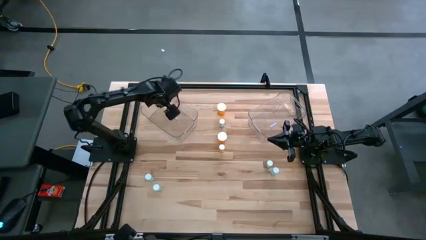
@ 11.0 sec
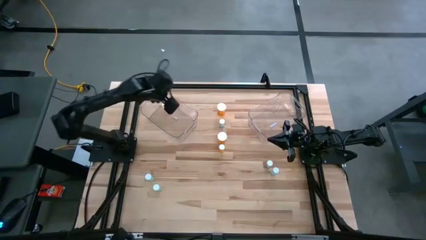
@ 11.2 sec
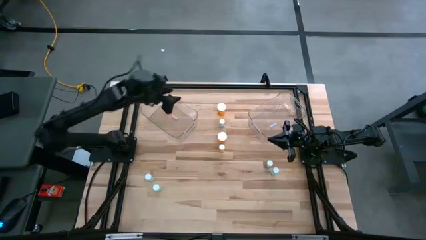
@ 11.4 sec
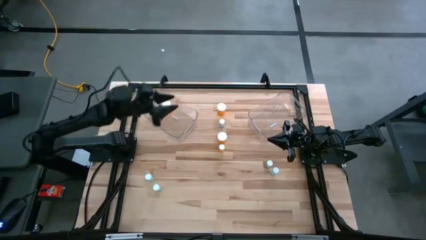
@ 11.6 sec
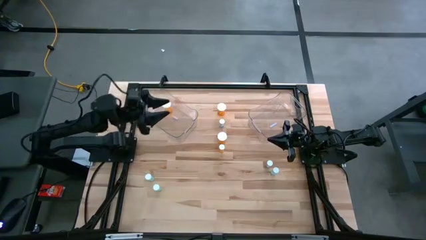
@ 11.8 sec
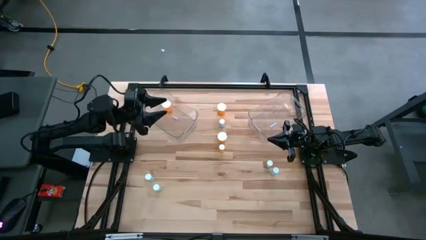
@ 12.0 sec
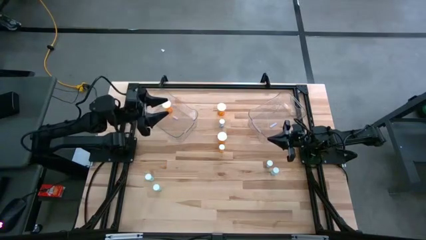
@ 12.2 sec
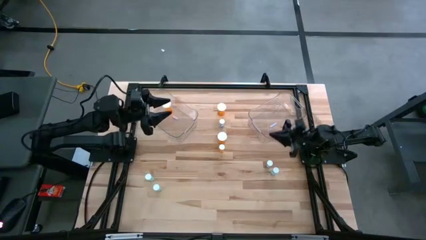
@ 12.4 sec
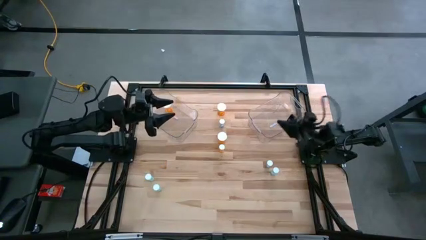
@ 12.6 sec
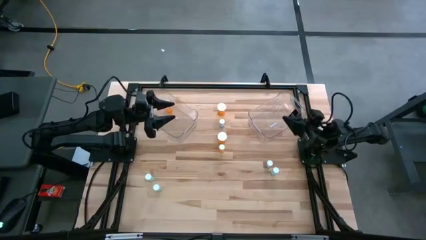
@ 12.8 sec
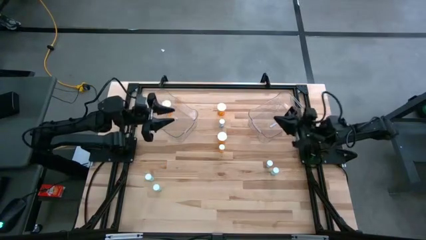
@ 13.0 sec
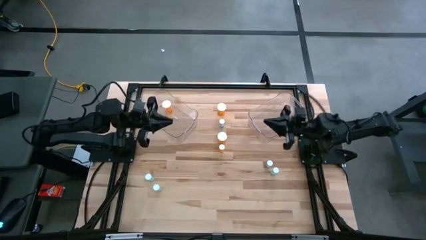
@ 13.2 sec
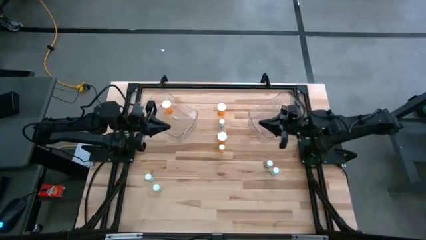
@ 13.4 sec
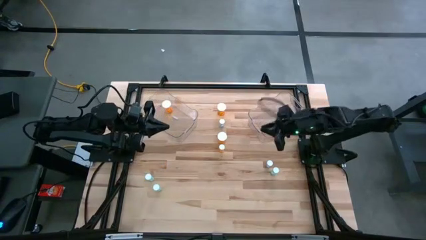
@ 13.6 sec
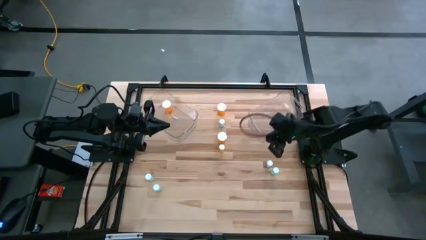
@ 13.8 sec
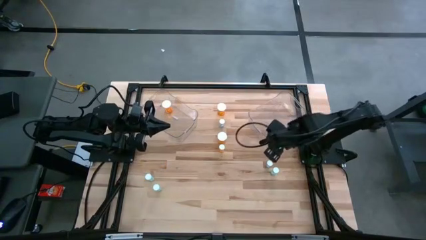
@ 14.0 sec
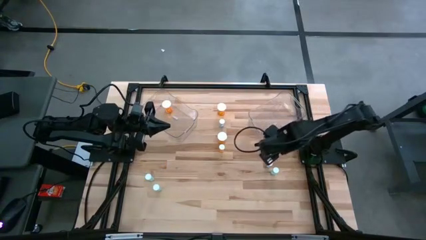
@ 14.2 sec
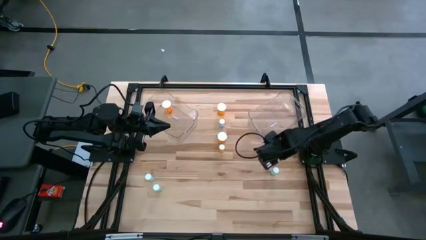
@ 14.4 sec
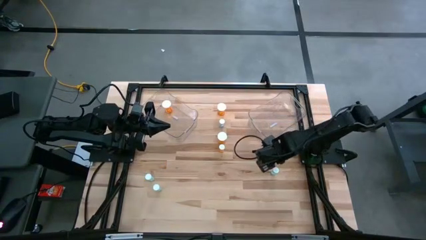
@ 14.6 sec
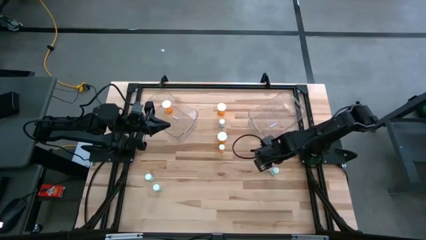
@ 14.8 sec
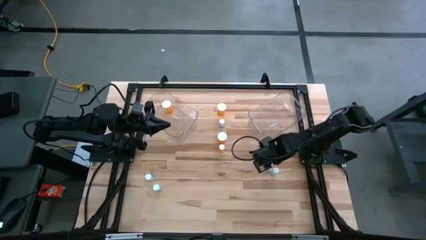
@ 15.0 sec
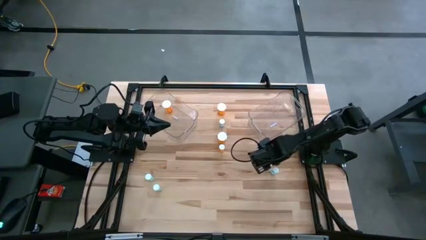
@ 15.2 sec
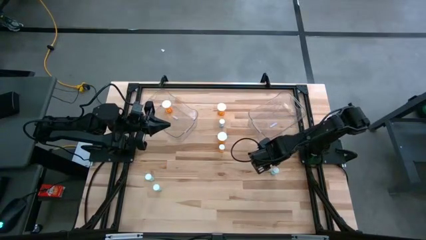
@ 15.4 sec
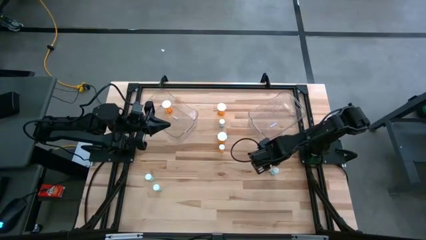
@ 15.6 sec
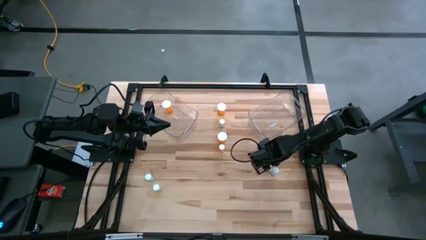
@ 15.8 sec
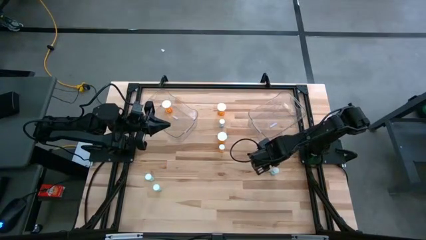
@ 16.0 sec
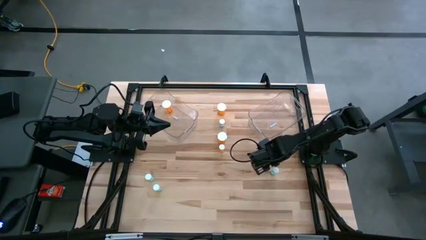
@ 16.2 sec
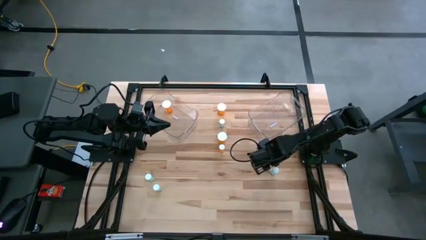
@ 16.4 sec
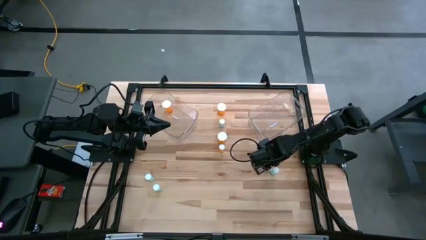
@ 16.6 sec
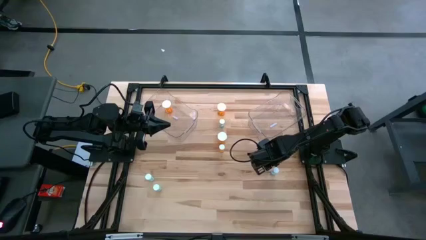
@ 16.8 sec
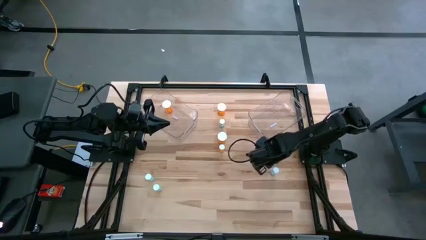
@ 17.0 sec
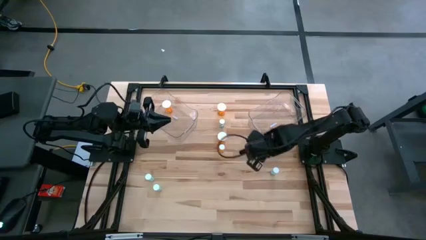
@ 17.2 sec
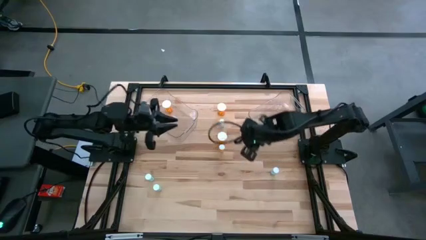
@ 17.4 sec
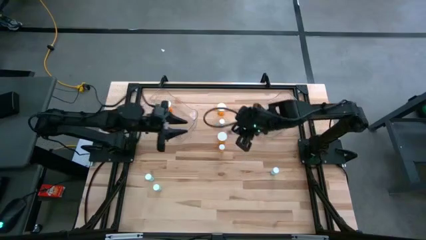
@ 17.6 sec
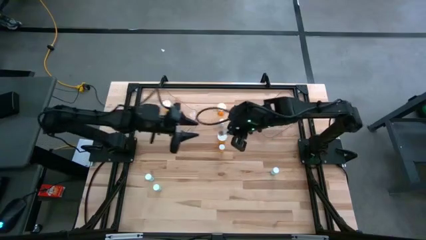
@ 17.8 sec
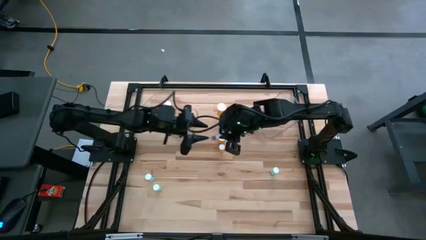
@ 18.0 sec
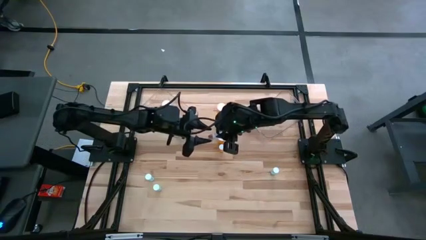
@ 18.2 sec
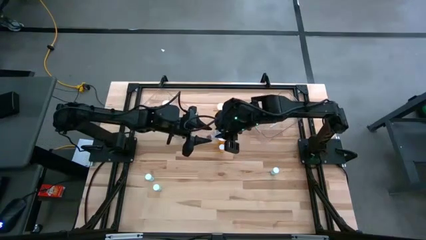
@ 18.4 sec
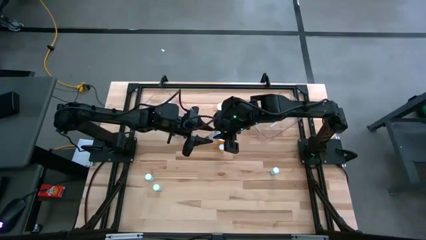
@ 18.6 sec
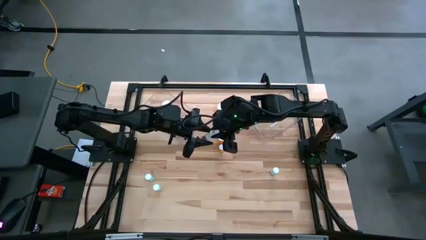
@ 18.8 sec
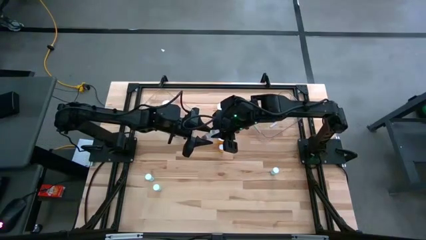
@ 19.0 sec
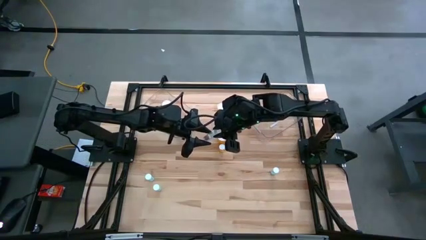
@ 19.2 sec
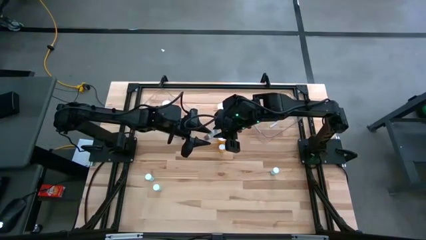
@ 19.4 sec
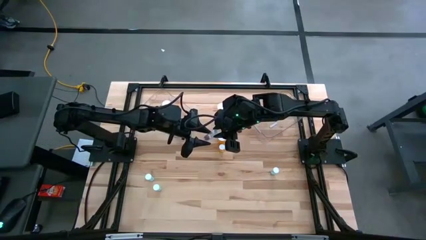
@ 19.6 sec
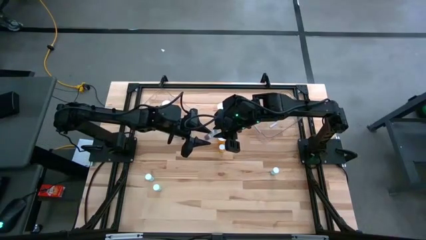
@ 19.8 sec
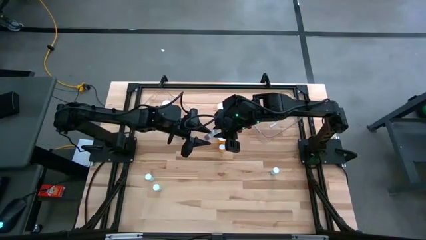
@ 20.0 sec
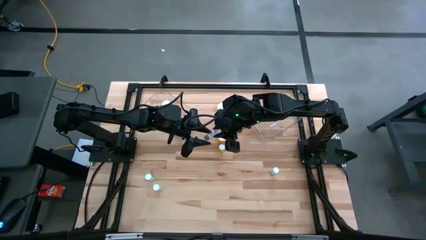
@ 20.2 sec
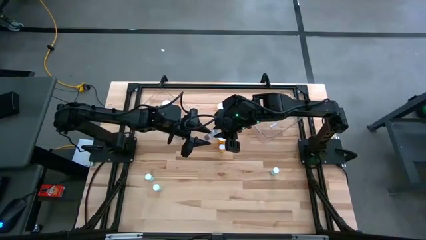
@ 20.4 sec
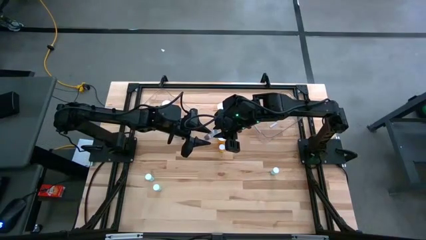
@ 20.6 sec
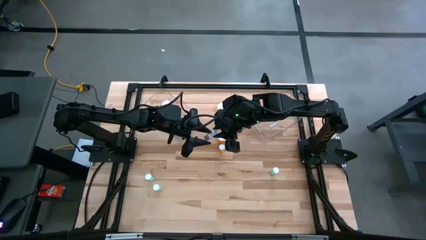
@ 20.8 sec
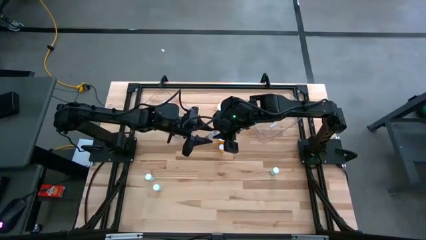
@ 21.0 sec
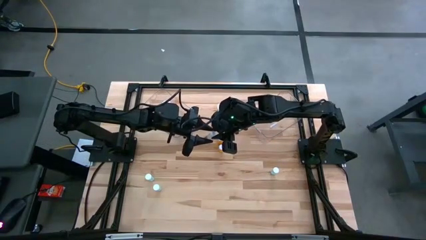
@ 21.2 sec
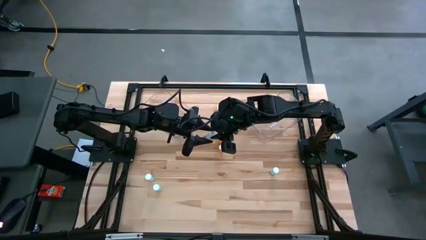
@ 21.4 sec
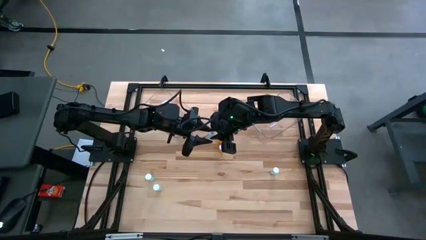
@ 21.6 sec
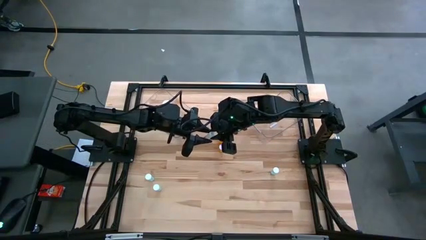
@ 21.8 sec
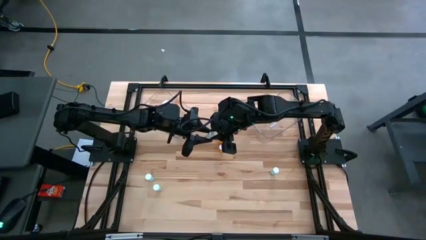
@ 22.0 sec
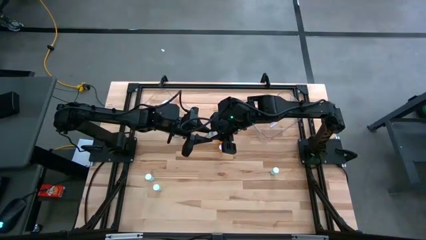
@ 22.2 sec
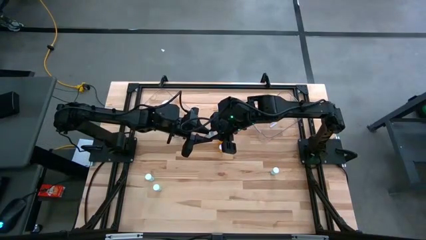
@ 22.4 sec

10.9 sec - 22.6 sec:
Task: Pick and place medicine bottles into bin by pill shape (circle, oval)
Put the bottom green capsule bottle into the left transparent bin

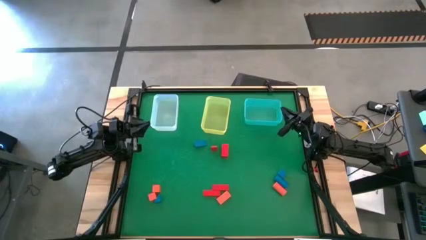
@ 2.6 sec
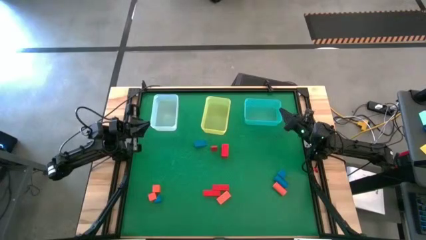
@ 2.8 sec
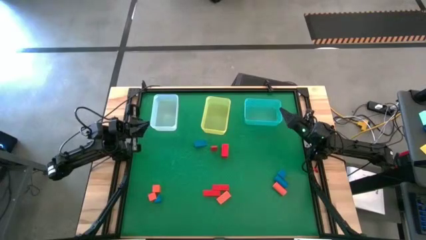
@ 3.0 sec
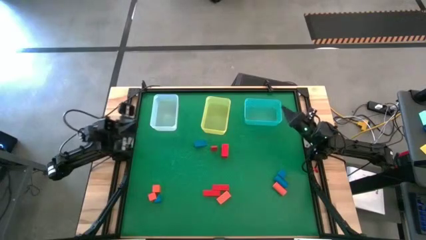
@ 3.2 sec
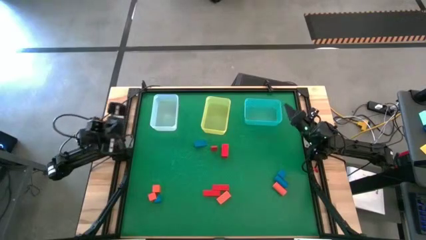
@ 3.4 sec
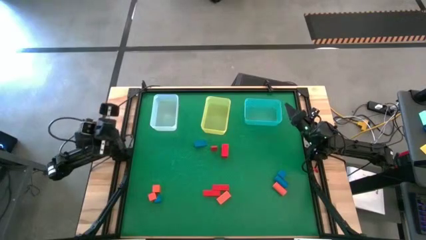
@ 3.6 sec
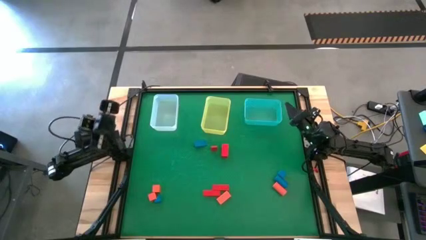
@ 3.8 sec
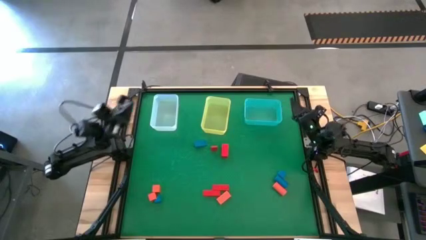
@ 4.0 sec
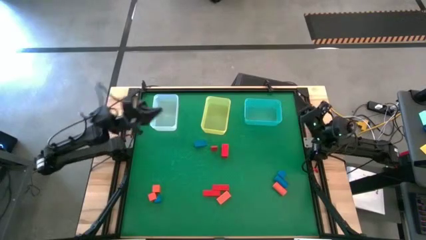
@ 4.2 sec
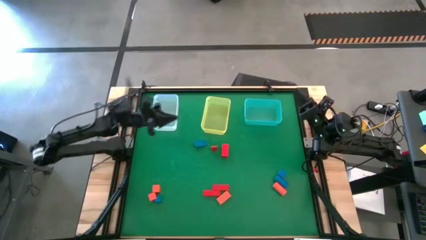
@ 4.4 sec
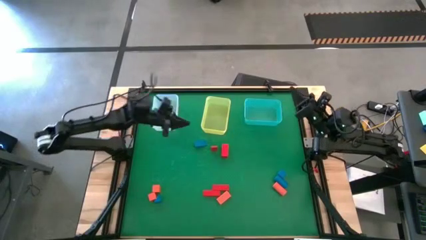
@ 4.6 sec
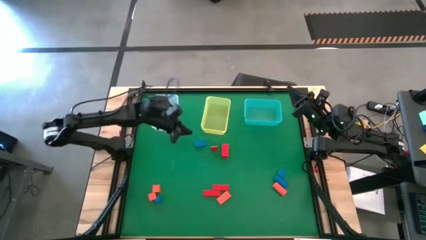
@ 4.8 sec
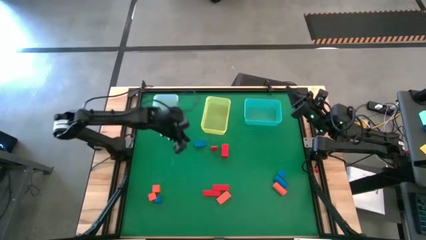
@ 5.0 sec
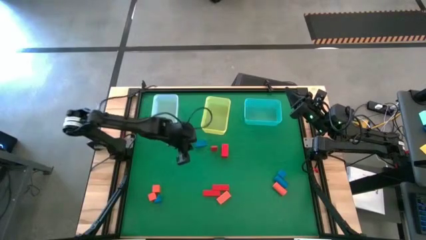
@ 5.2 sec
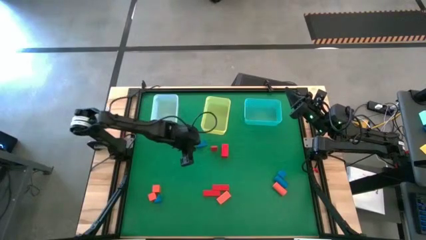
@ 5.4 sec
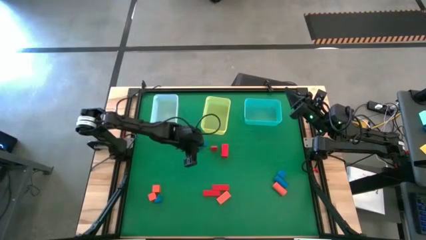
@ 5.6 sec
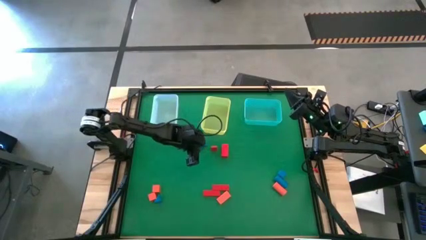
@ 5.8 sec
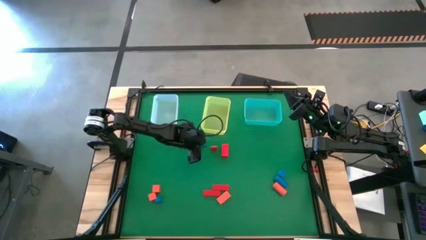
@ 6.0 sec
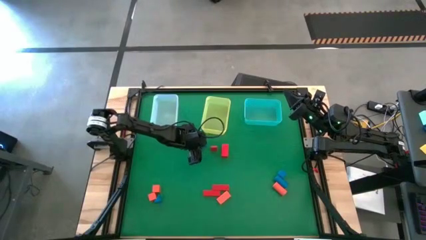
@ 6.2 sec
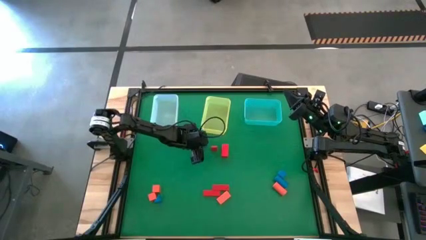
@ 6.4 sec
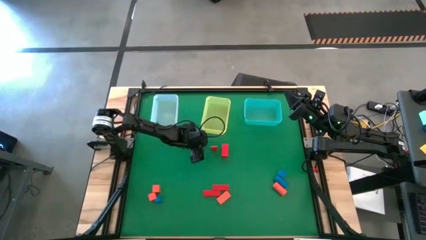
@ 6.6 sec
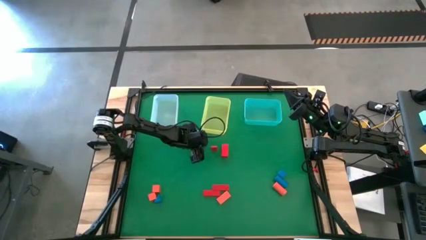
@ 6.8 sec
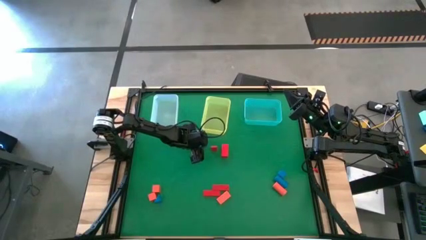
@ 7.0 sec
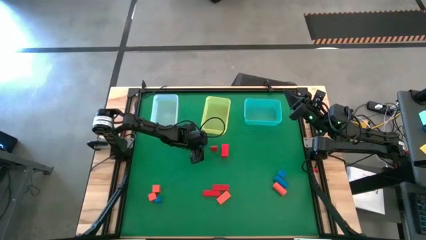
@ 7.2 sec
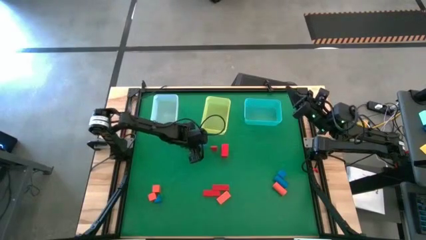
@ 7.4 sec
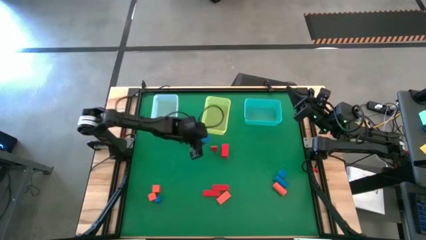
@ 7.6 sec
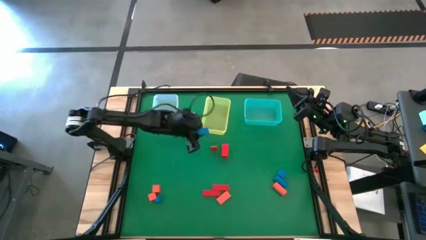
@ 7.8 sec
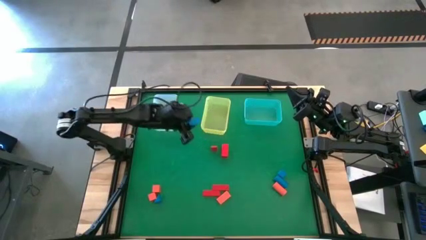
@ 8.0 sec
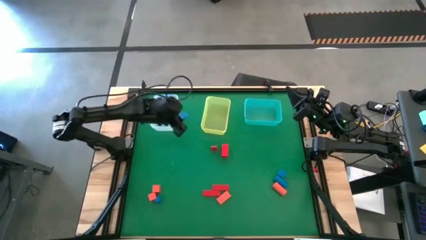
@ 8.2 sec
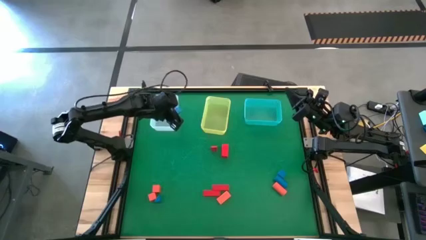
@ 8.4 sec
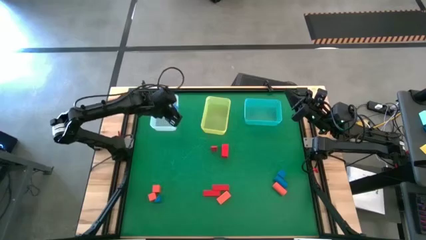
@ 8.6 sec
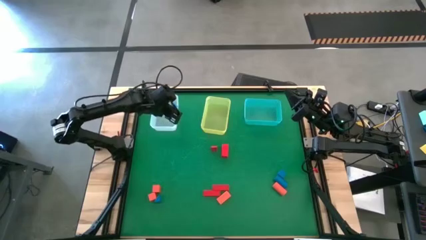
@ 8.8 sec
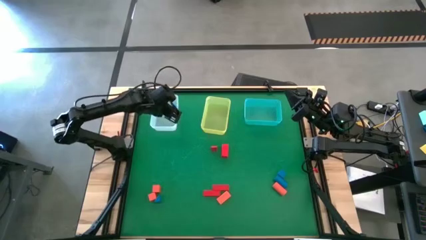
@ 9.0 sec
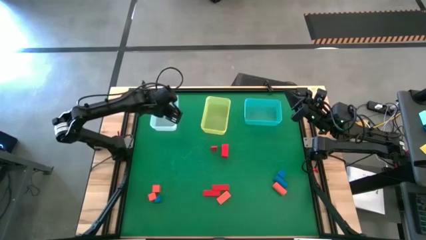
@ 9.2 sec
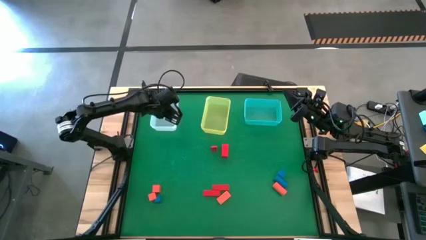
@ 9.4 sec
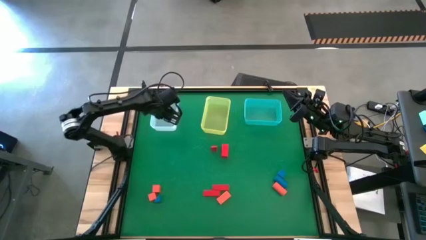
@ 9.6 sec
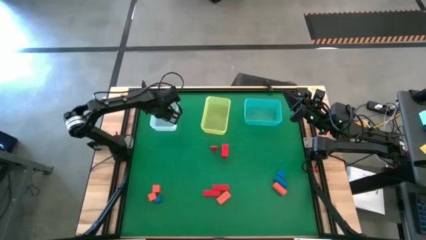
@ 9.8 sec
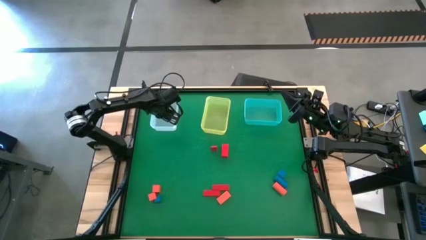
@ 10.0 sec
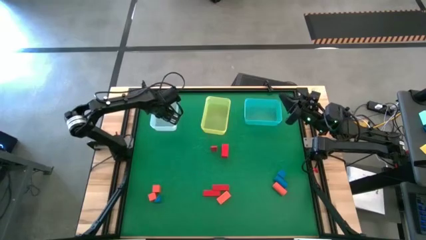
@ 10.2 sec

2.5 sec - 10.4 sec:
Task: Sort & place blocks by color
Put the blue block into the white bin
